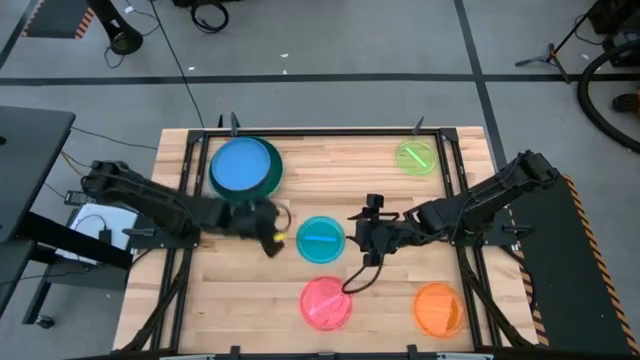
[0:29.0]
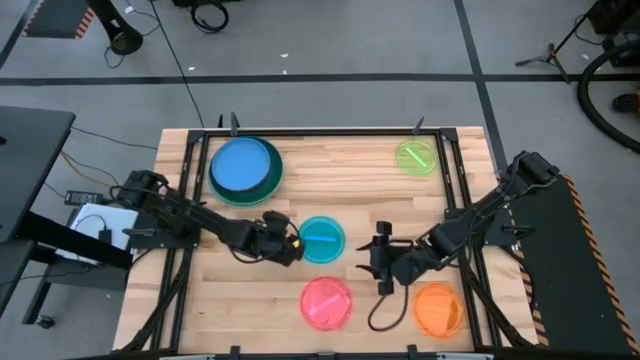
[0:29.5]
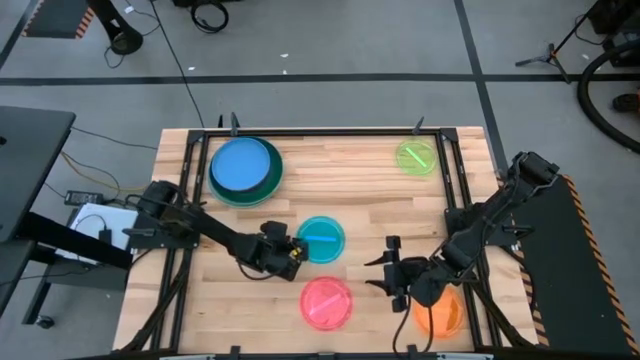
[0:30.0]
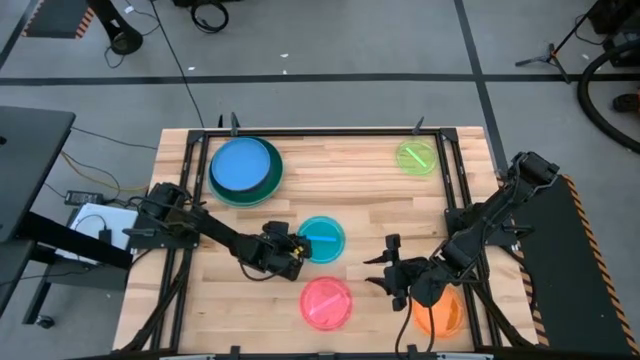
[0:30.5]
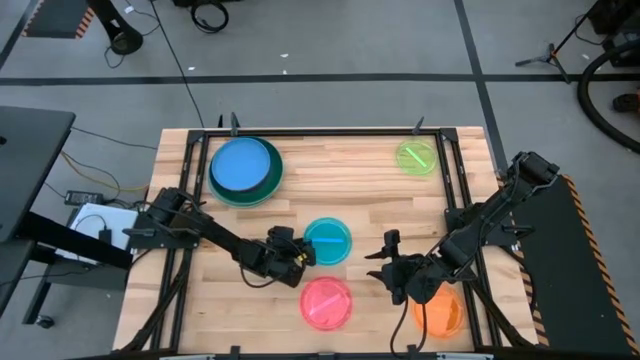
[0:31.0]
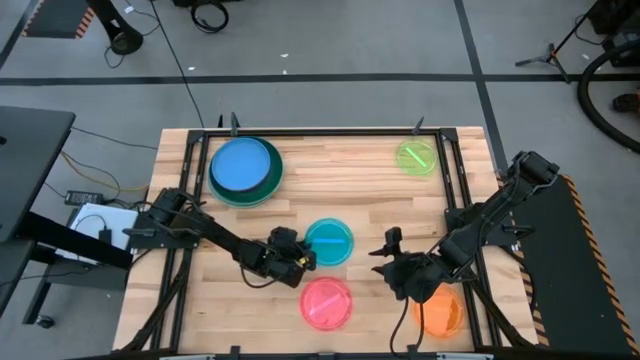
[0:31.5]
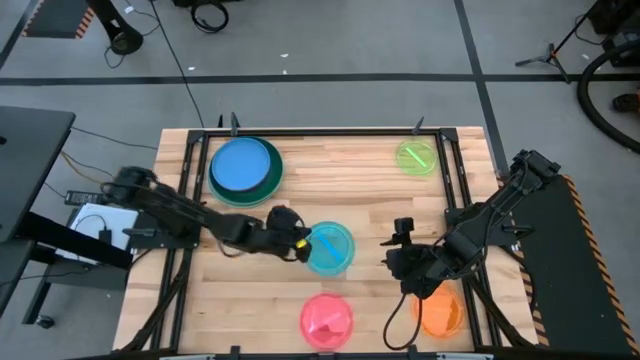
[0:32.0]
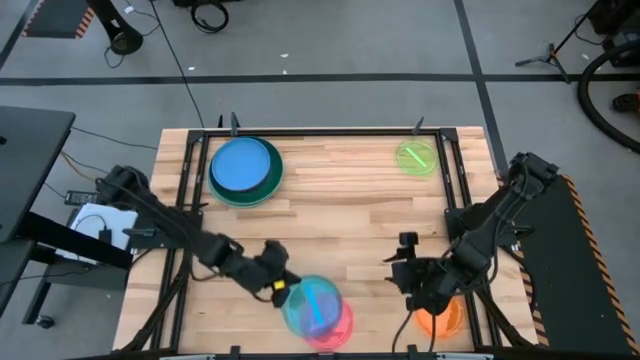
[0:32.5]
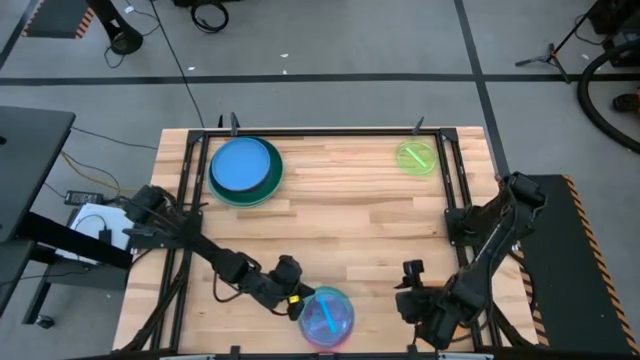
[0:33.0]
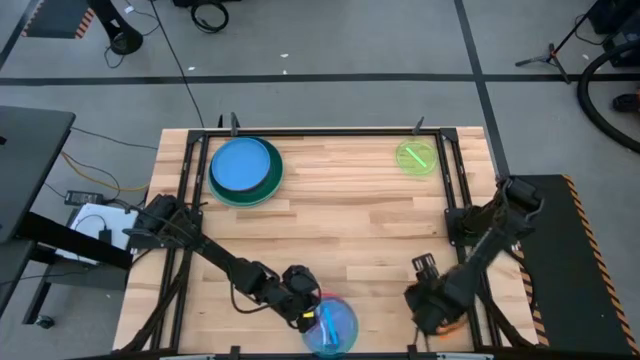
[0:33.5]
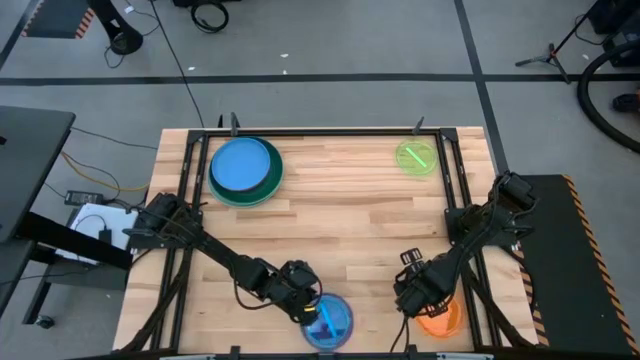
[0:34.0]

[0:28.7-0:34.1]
Task: Stack plastic plates
Stack the light blue plate on top of the pink plate

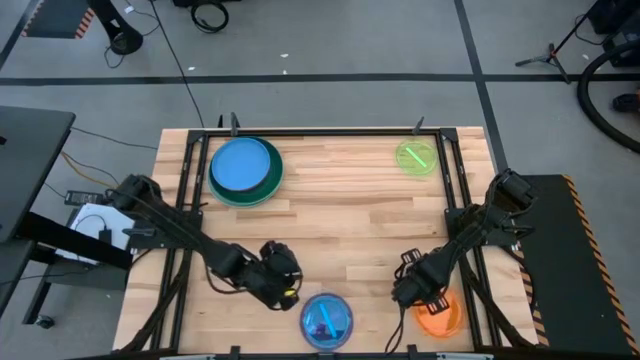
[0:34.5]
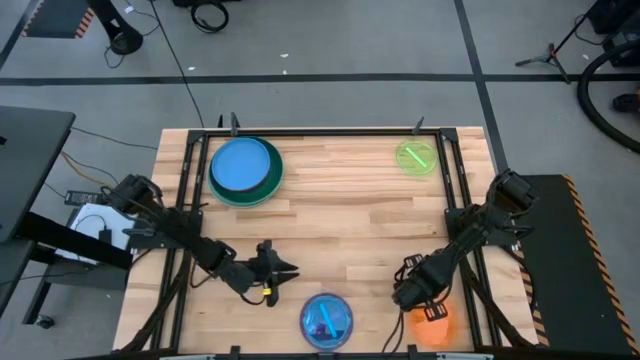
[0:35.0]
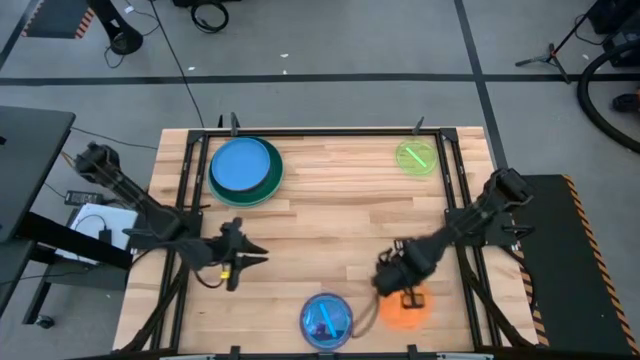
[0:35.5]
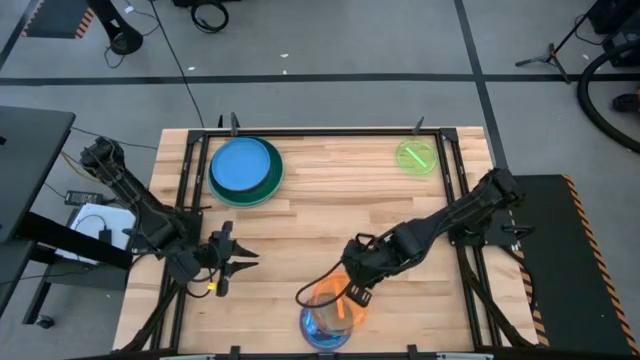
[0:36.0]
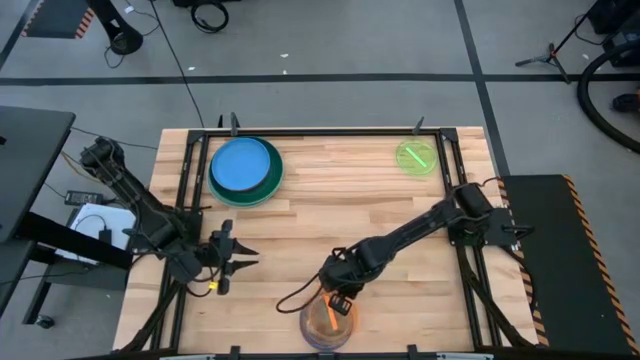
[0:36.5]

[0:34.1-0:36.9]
Stack the light orange plate on top of the light blue plate

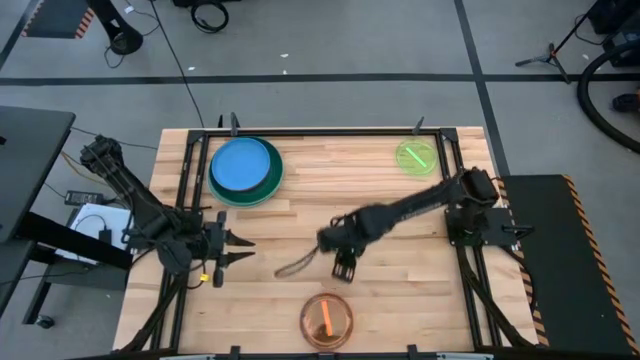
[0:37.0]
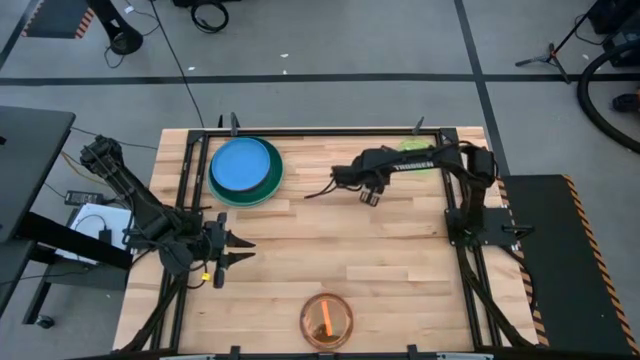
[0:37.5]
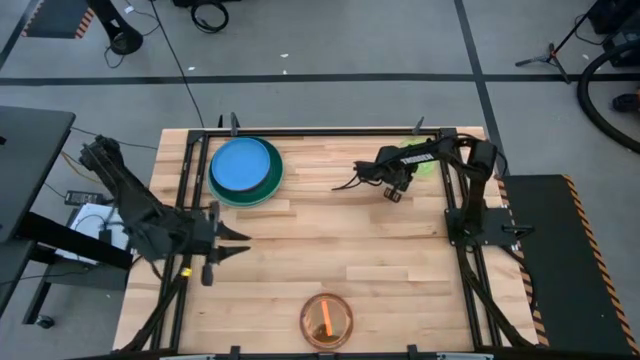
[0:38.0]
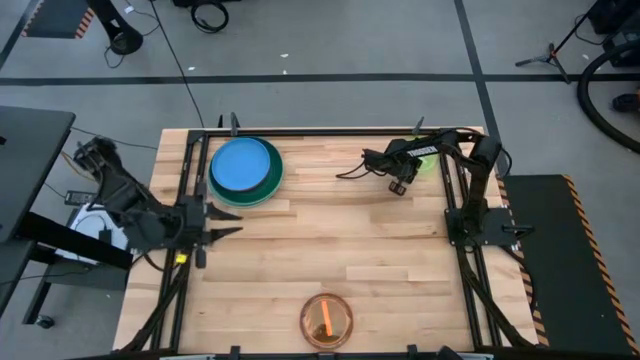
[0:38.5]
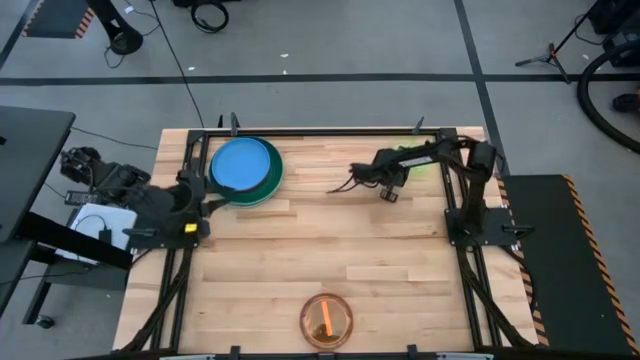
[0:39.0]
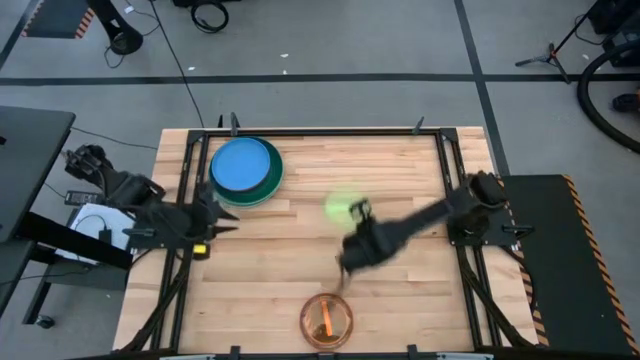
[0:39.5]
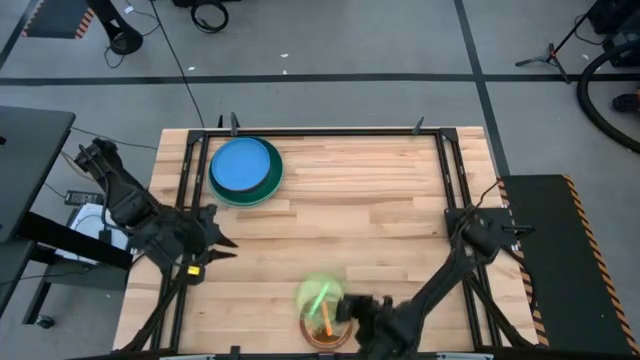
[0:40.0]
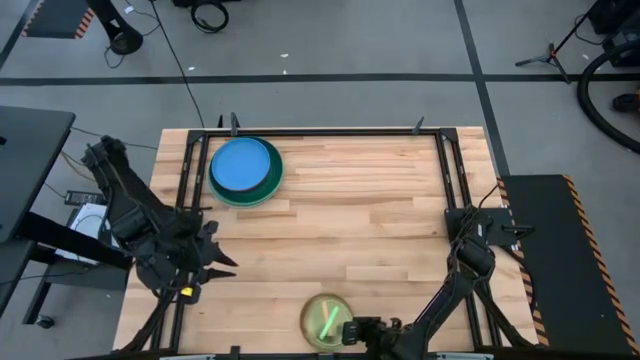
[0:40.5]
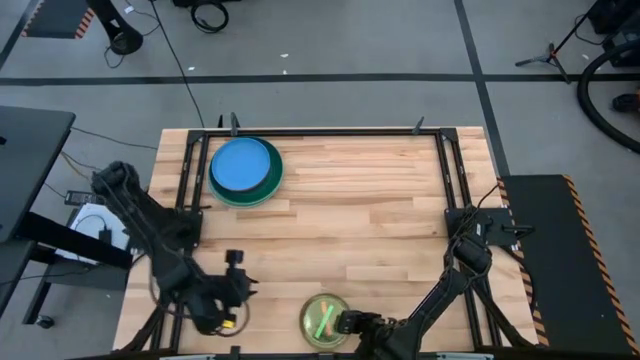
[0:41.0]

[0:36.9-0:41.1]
Stack the light green plate on top of the light orange plate

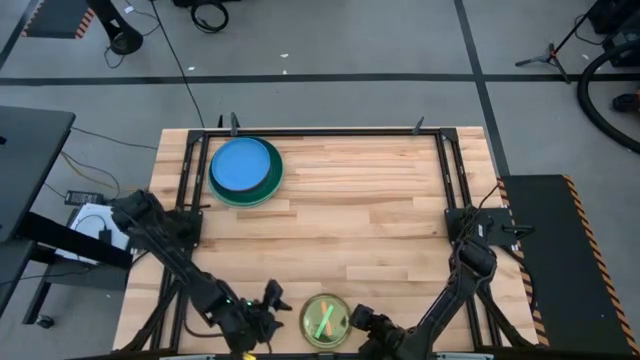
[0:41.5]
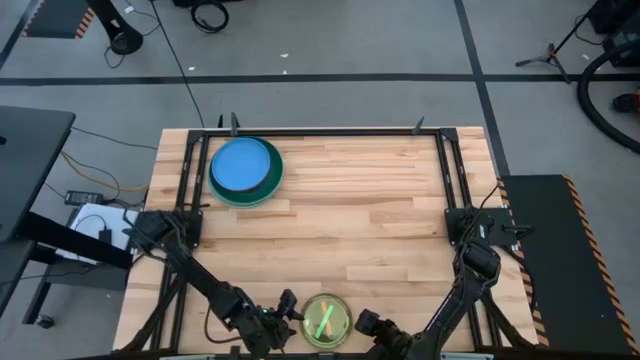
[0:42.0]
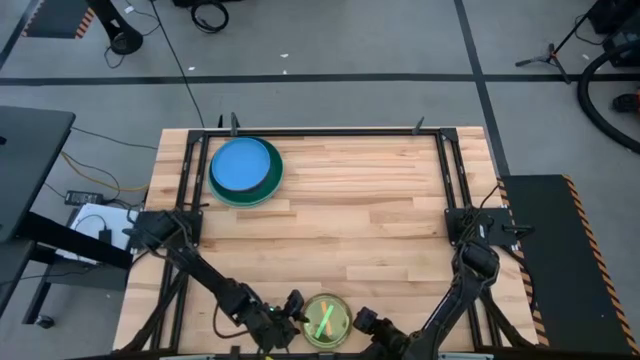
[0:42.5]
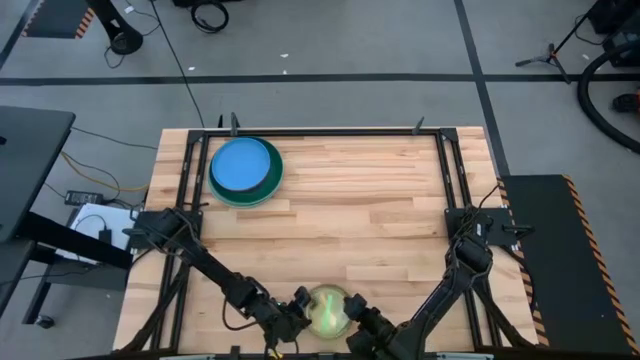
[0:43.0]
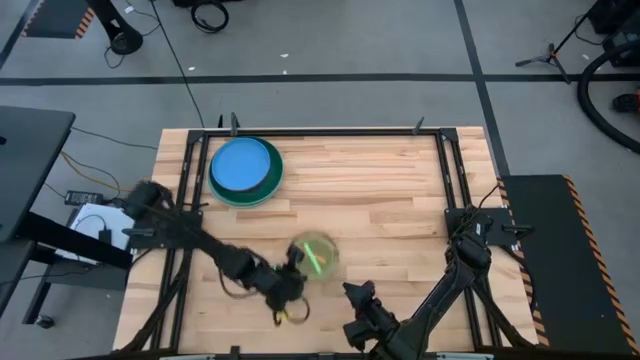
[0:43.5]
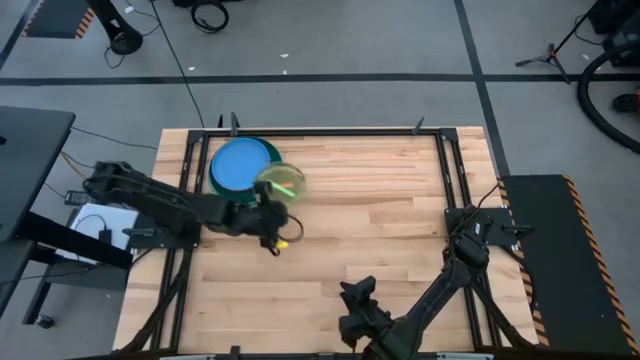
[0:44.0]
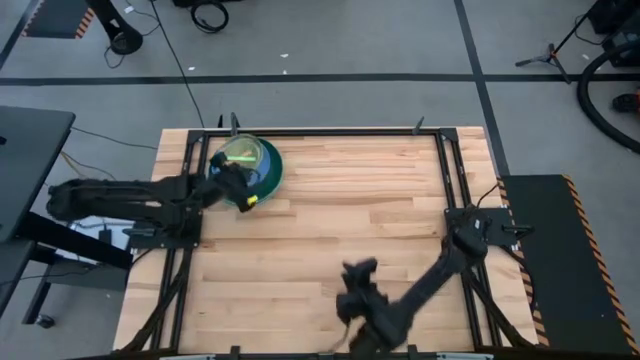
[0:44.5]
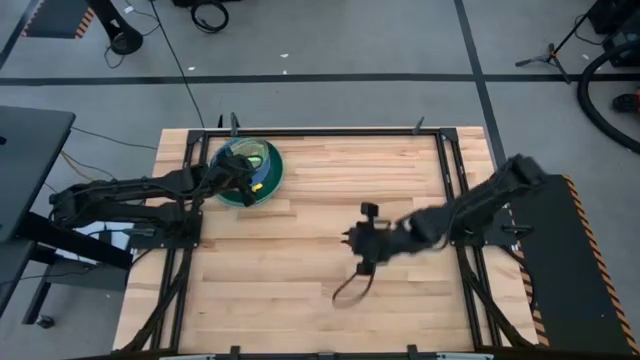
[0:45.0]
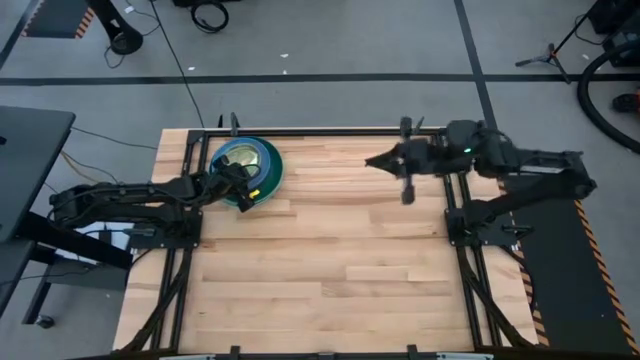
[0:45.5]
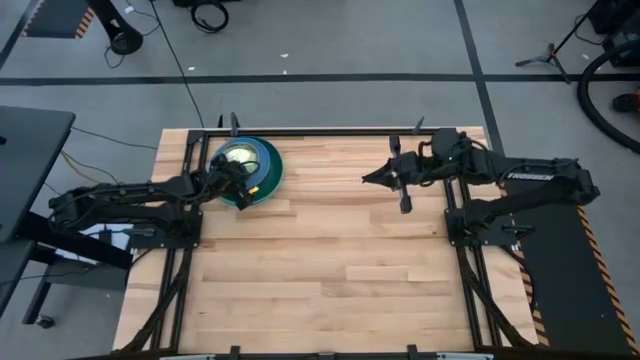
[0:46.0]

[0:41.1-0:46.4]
Stack the stacked plates on top of the blue plate

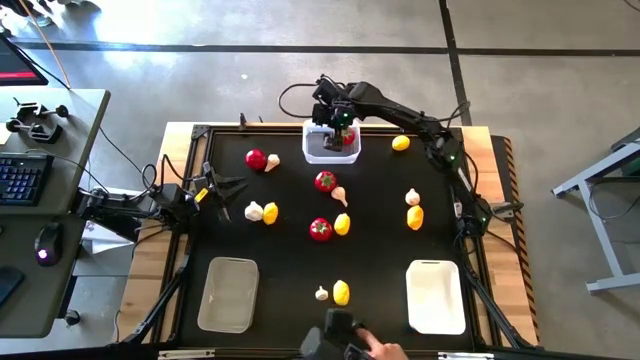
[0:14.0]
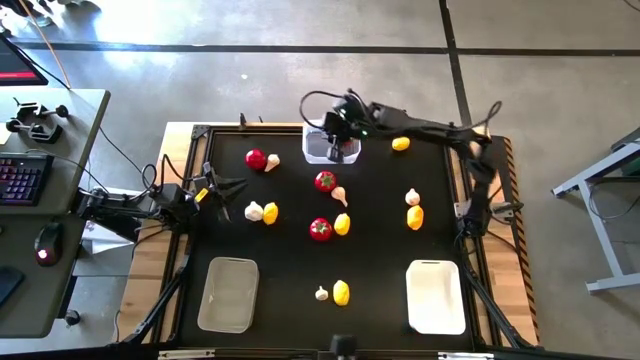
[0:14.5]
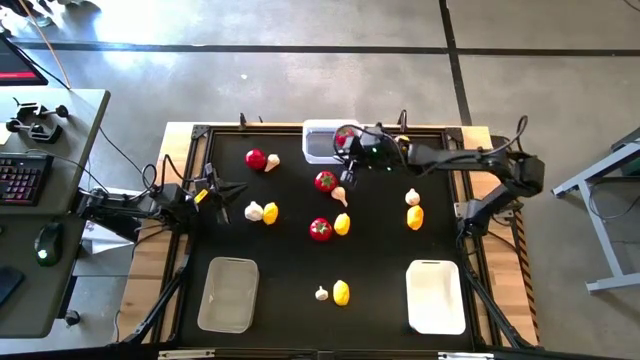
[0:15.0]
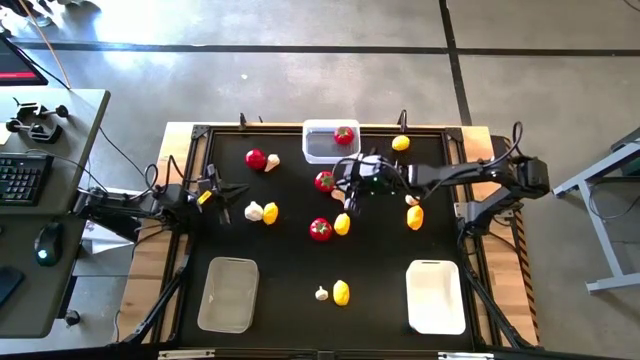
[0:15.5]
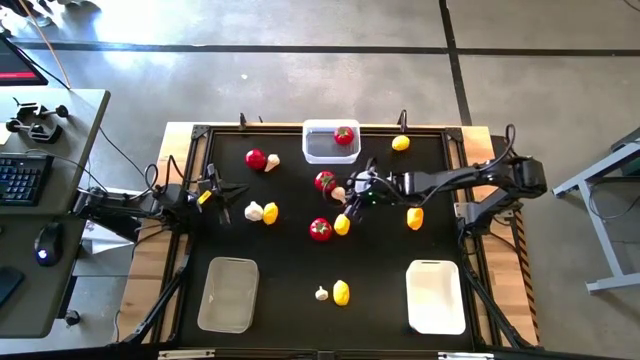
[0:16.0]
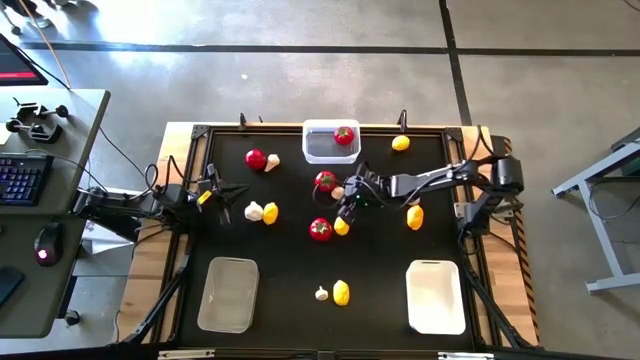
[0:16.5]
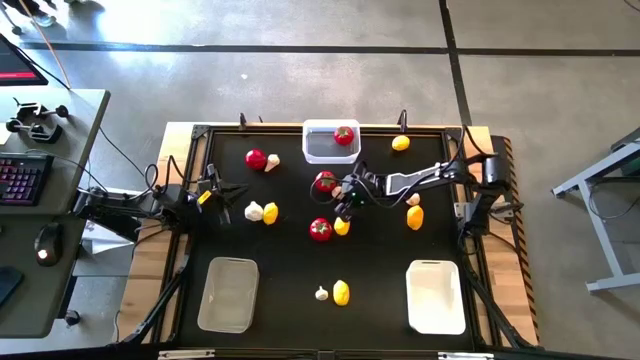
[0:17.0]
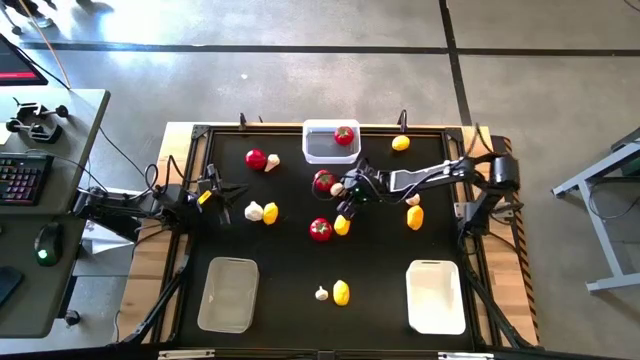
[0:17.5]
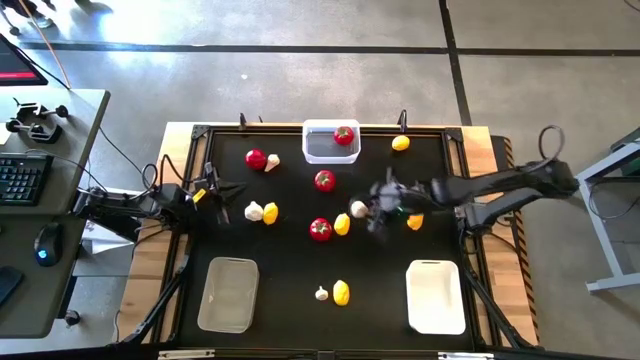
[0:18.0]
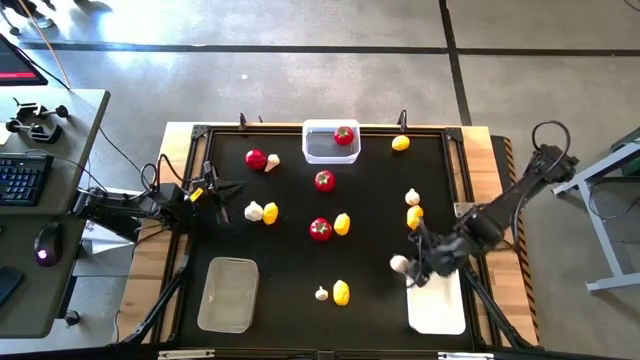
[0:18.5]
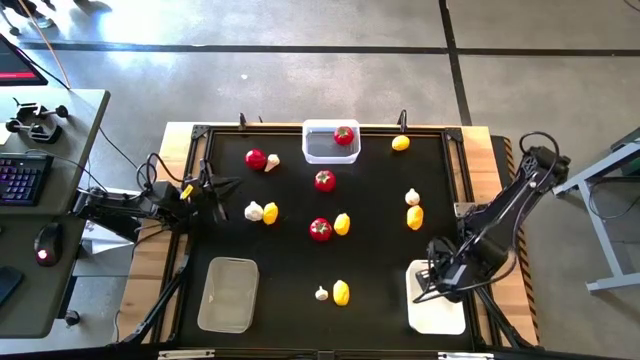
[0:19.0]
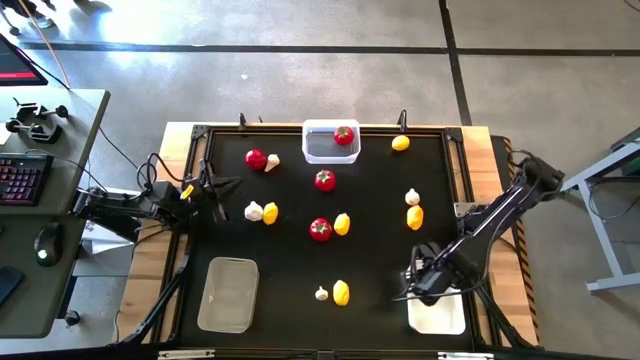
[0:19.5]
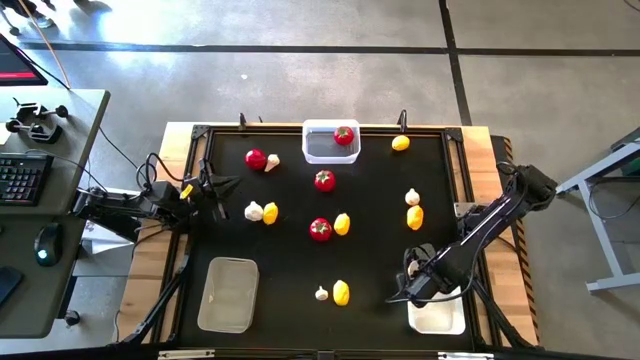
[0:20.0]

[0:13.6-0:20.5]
Task: Sort produce into baskets
Put the white garlic into the white bin
